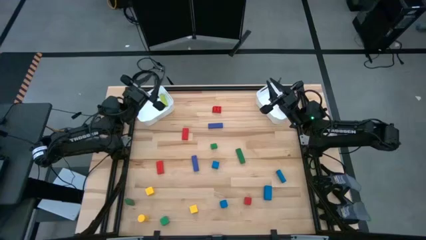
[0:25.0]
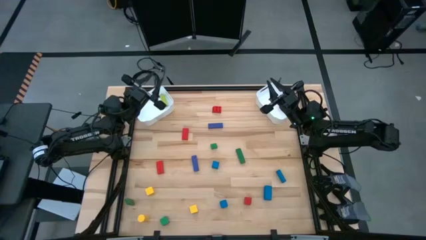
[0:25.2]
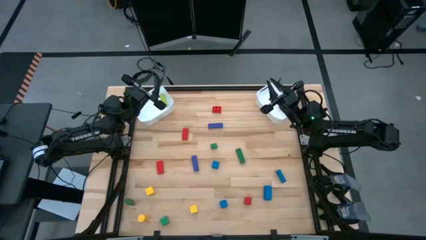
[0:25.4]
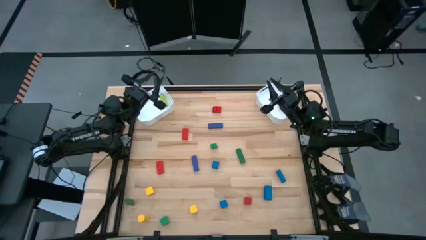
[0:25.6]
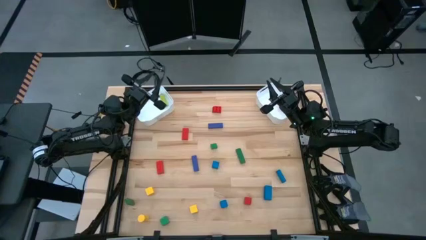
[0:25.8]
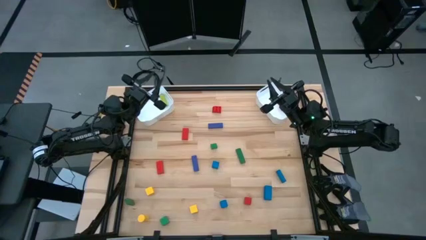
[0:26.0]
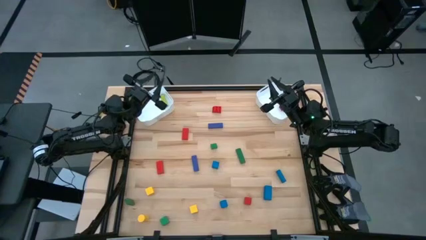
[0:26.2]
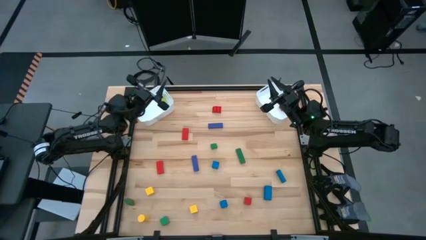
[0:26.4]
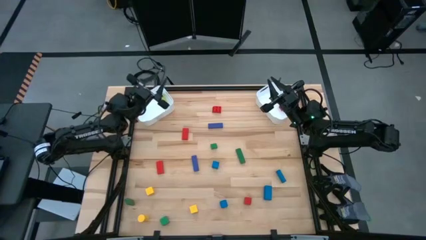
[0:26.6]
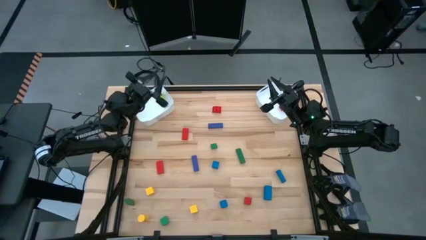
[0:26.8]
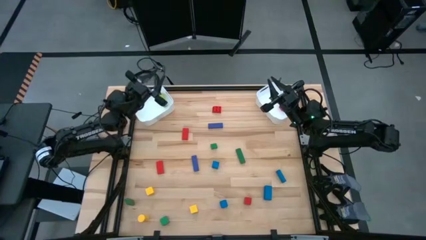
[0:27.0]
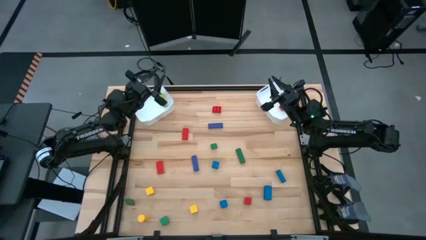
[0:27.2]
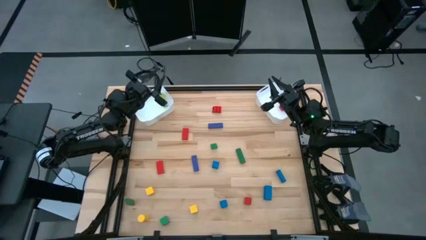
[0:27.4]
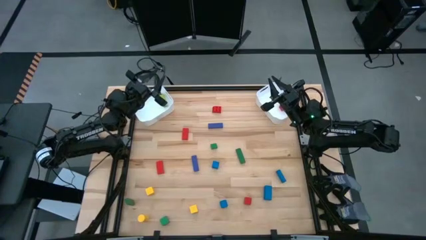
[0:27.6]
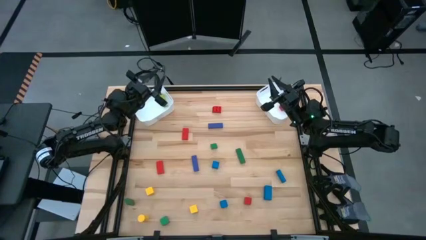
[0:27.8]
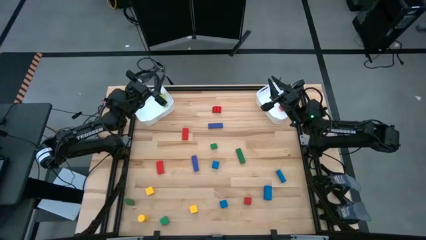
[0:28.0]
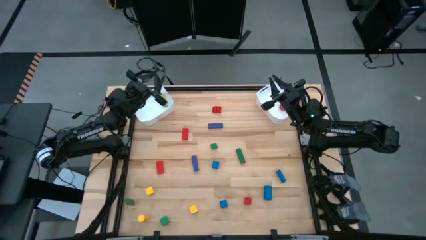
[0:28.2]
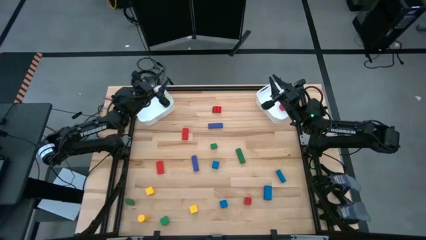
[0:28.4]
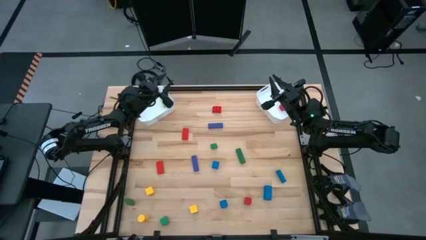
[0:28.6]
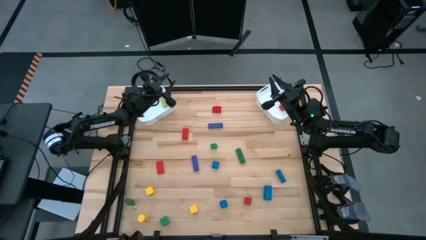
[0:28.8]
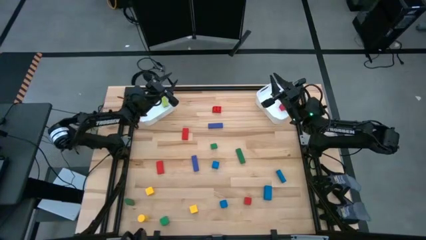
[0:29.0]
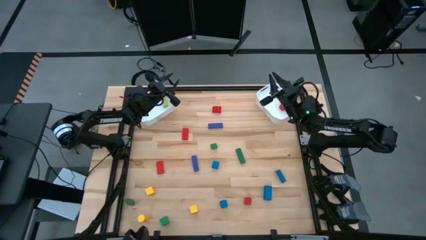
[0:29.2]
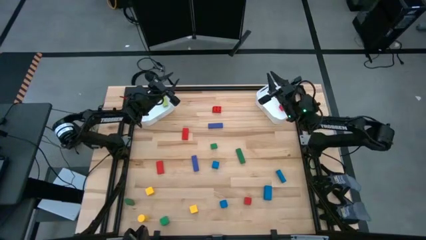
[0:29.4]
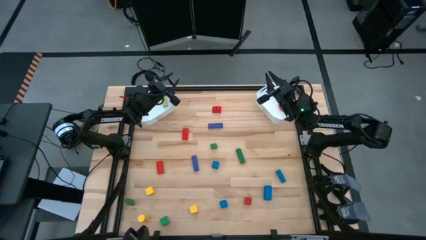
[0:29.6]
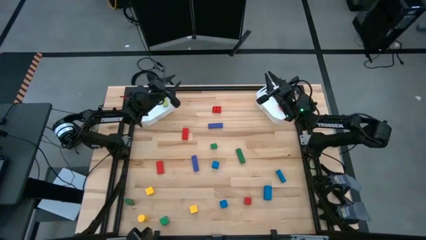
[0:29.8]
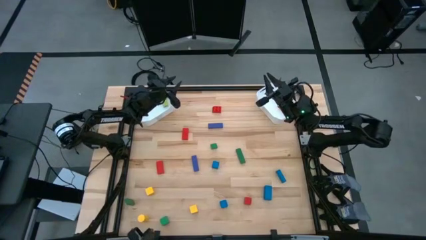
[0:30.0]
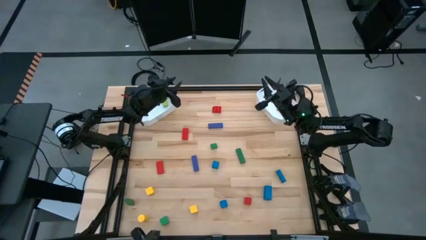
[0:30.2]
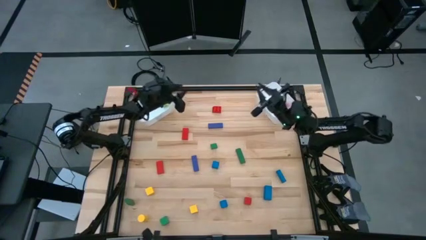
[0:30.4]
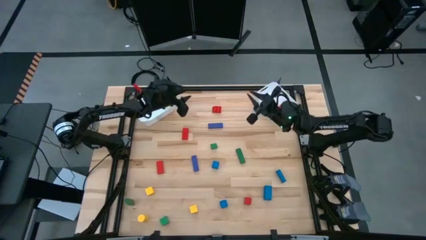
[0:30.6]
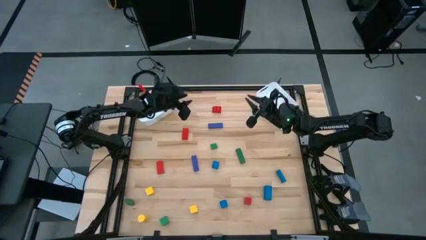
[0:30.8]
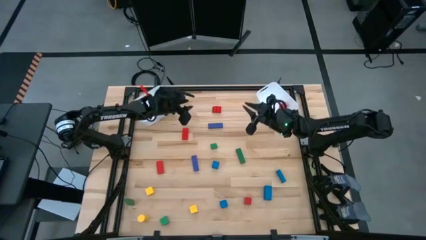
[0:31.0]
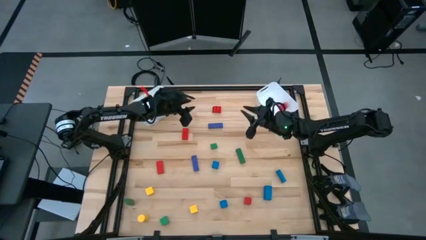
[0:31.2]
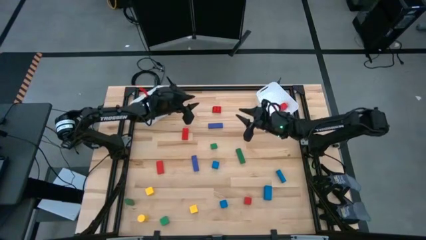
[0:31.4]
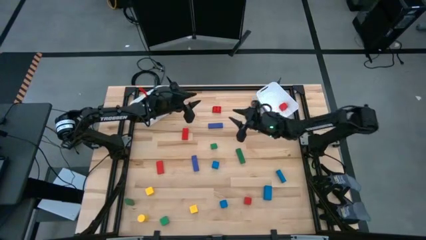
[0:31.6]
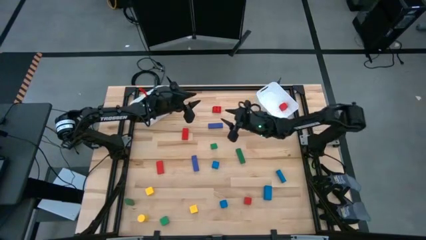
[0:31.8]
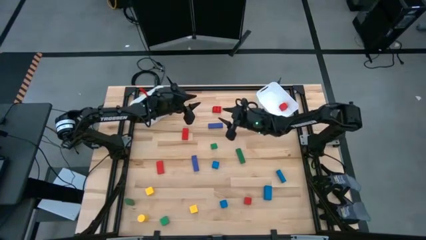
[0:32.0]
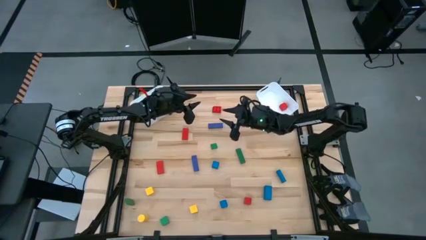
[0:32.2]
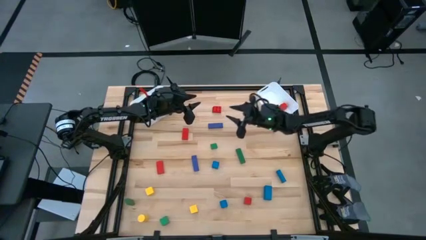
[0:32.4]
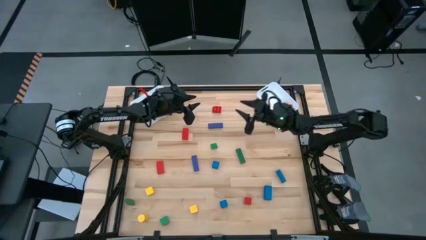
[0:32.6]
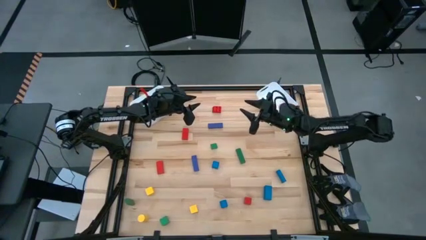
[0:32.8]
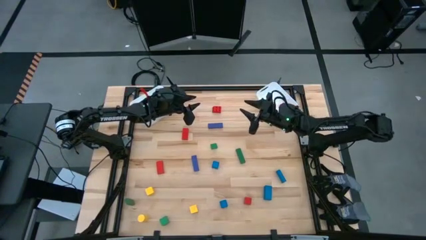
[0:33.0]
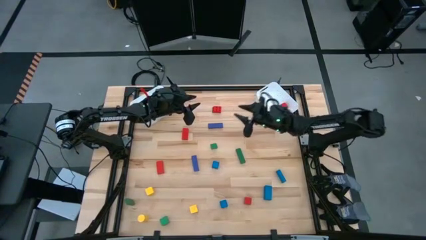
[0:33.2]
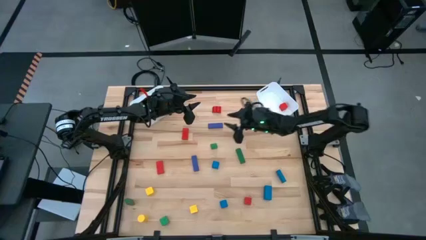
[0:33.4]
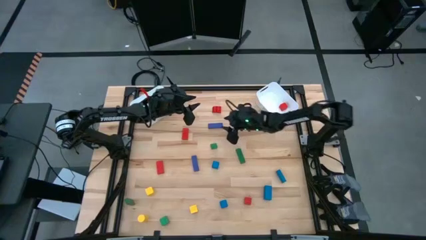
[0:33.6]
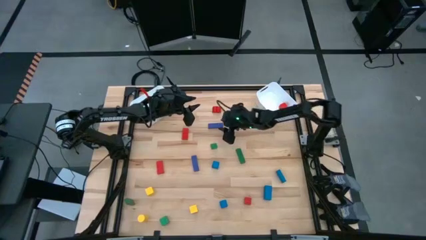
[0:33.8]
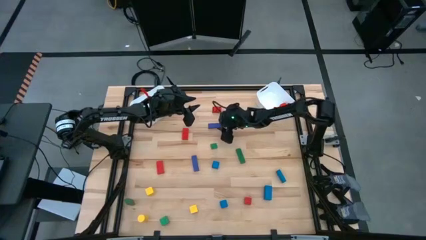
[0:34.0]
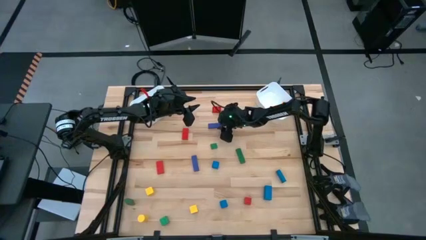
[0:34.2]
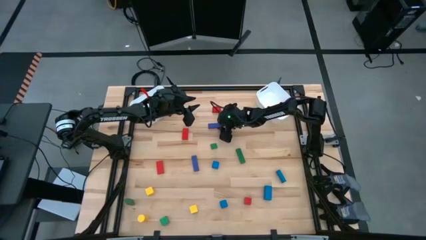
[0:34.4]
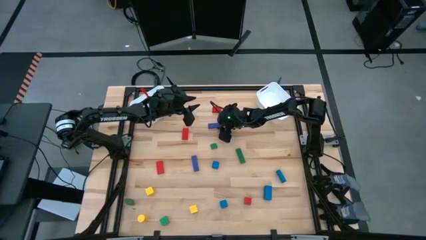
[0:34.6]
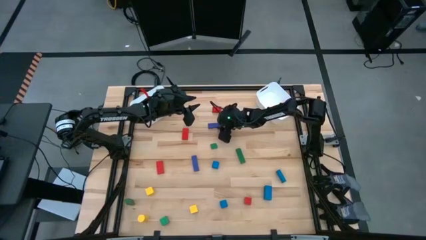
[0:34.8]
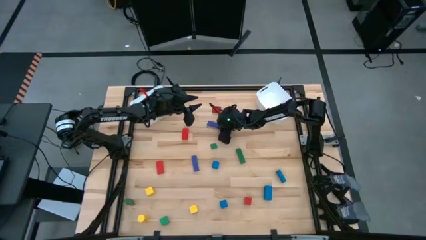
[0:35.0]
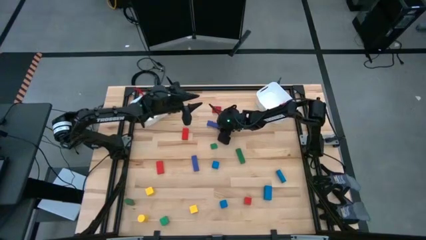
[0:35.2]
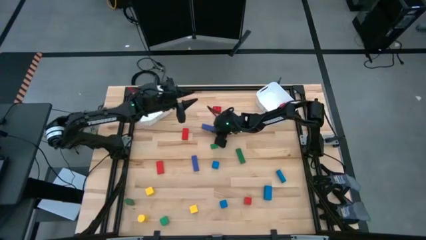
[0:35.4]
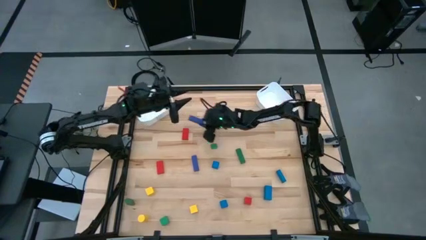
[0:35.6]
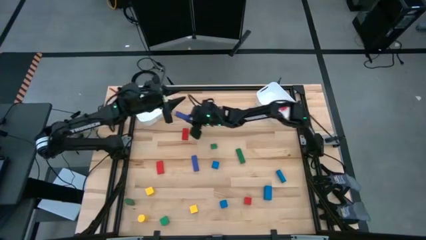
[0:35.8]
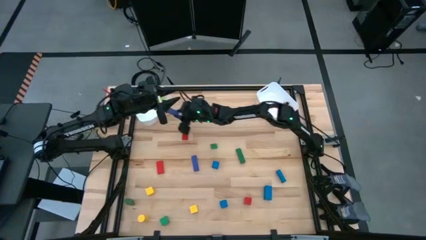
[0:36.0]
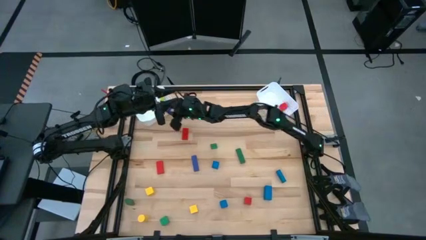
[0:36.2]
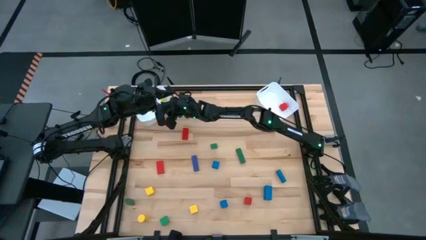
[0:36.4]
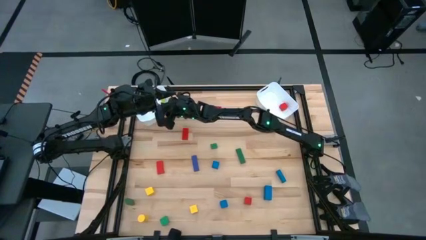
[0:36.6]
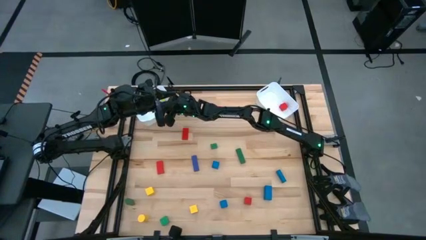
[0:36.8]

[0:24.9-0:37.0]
Task: Sort blocks by size
Put the large violet block into the left white bin

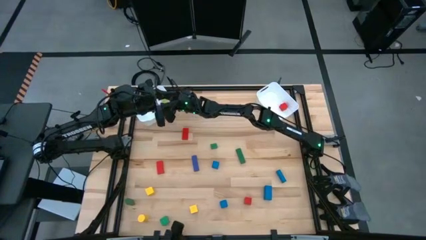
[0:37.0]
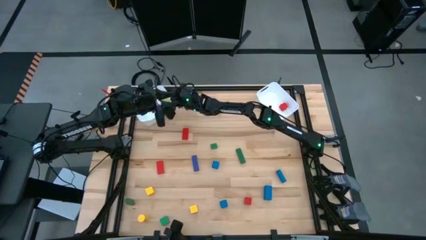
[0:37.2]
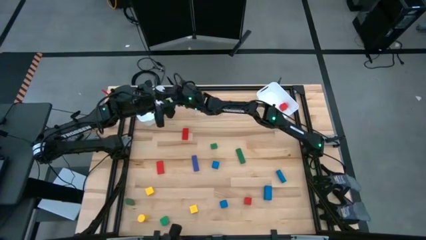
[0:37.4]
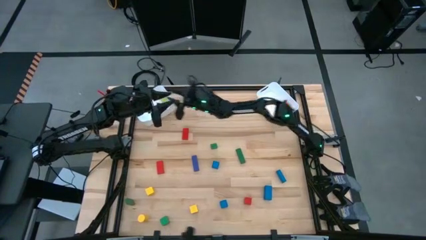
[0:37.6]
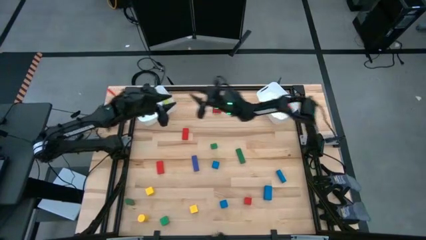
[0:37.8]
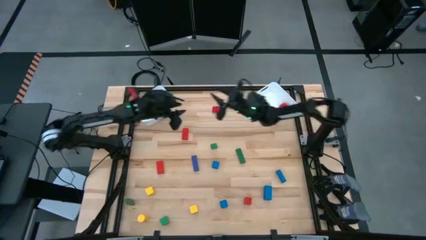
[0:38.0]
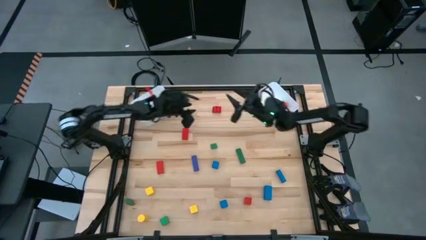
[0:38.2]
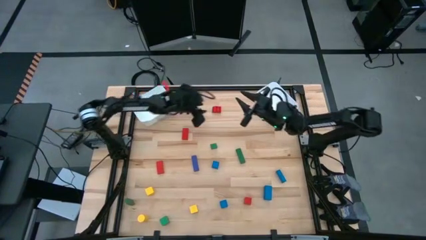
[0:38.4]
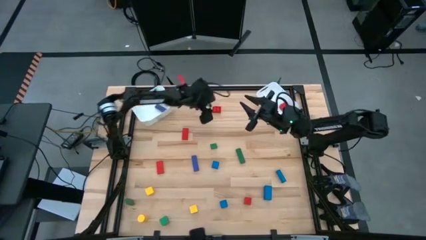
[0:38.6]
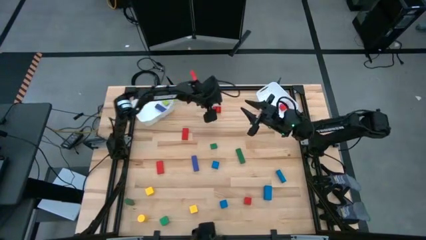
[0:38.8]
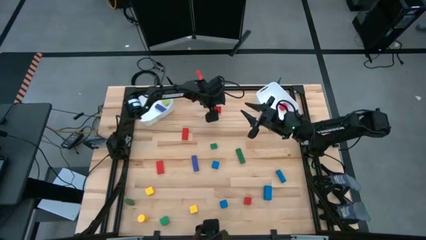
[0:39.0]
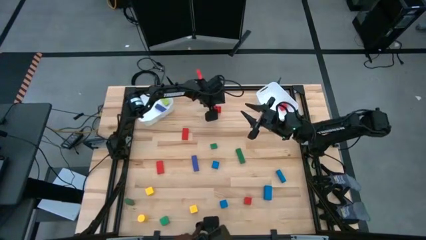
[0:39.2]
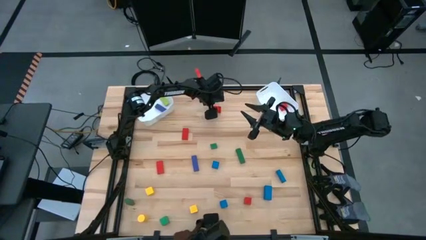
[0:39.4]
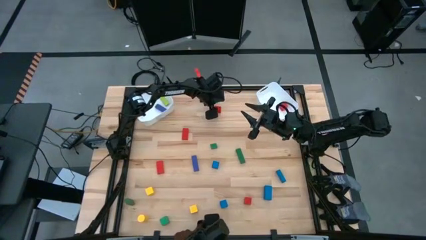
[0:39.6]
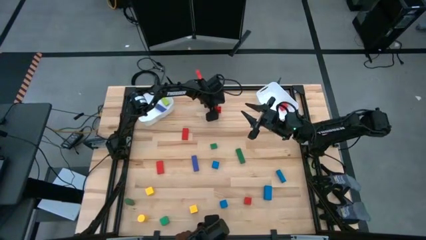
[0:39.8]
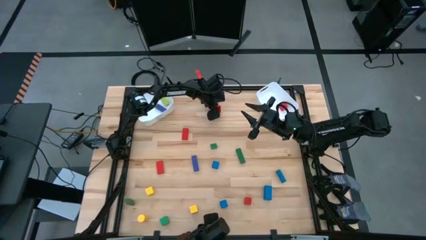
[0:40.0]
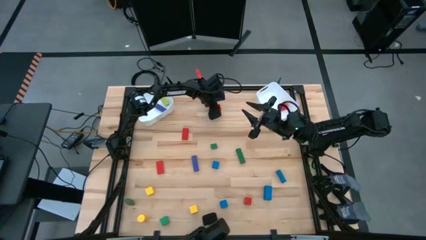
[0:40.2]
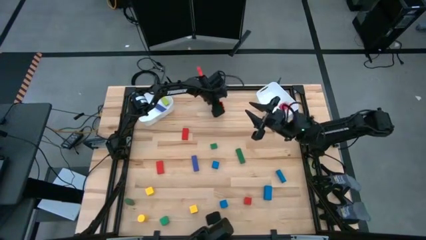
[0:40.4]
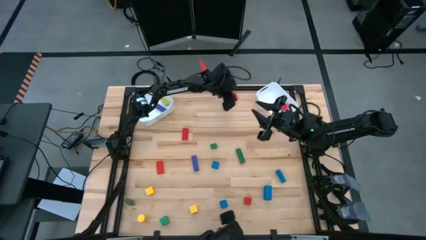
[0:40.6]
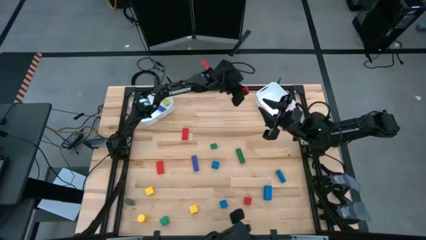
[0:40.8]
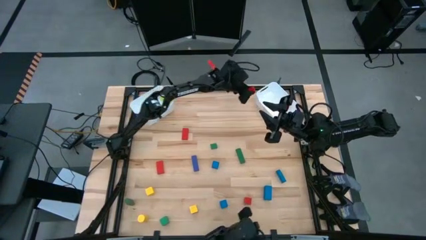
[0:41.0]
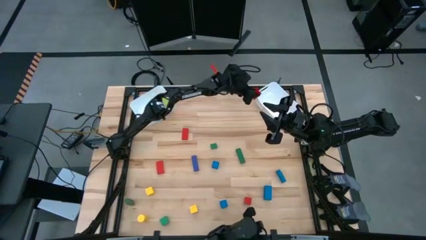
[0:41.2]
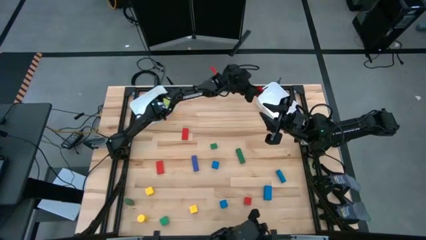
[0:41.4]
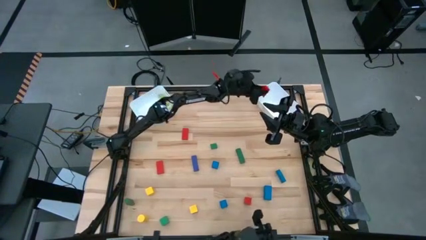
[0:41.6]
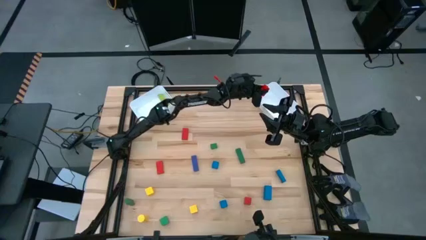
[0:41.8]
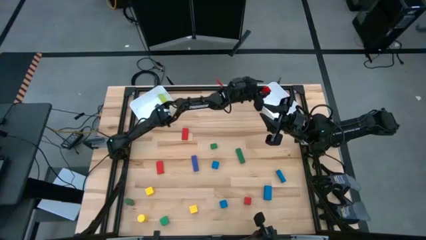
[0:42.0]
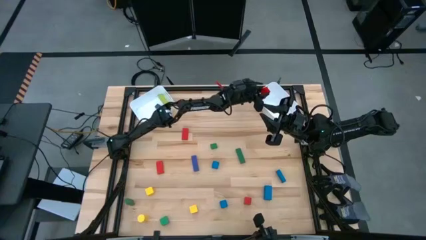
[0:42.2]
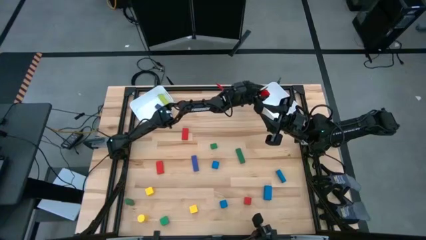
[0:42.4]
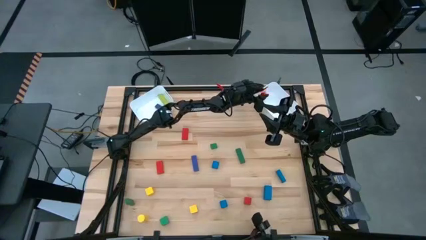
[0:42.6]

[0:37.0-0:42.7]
Put the small red game piece into the right white bin
